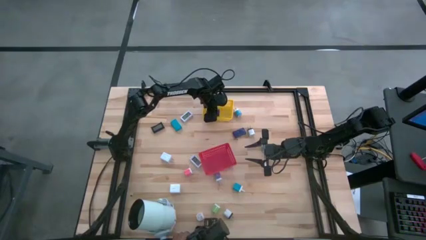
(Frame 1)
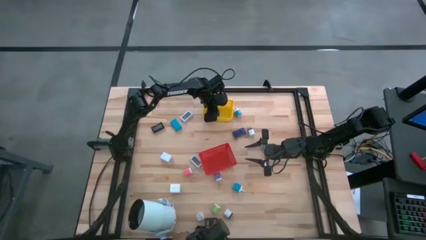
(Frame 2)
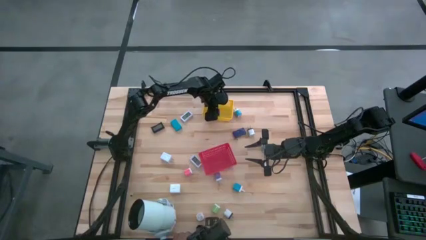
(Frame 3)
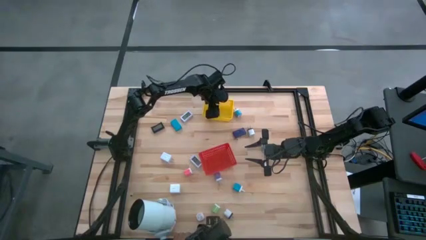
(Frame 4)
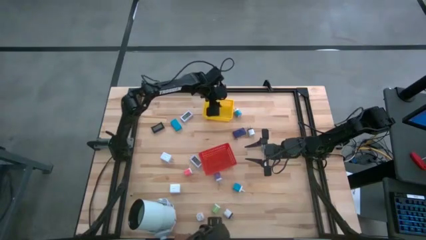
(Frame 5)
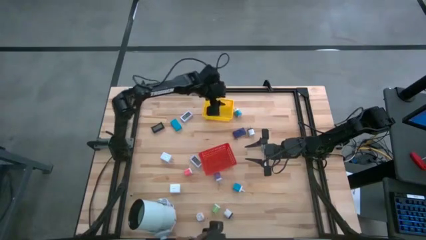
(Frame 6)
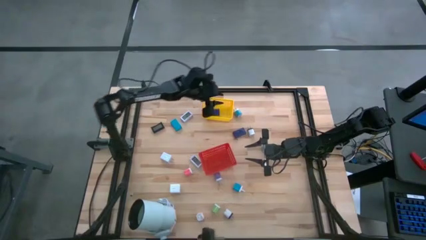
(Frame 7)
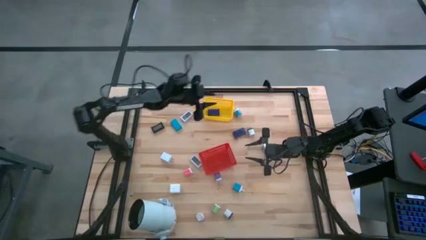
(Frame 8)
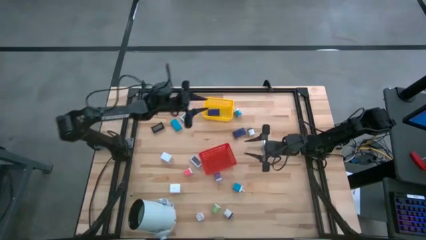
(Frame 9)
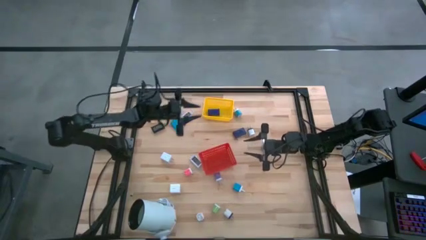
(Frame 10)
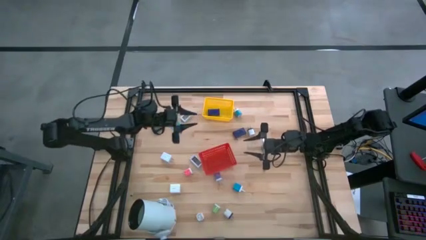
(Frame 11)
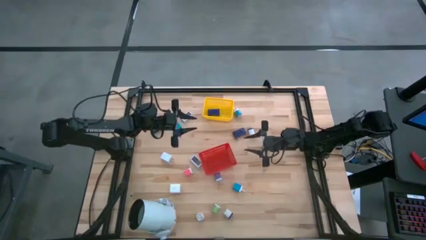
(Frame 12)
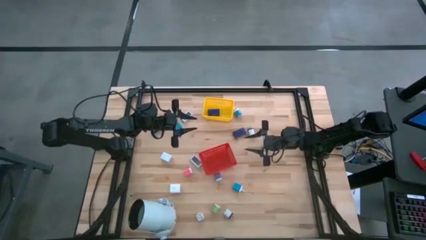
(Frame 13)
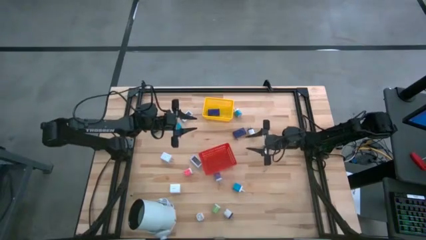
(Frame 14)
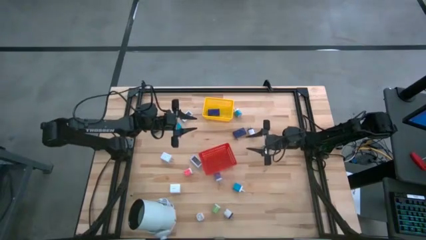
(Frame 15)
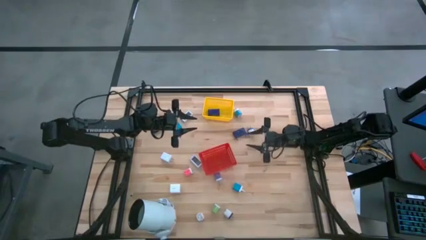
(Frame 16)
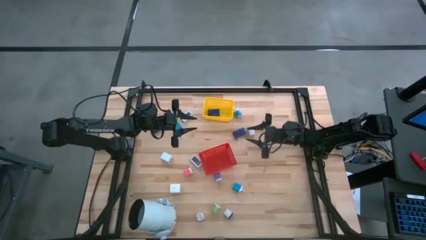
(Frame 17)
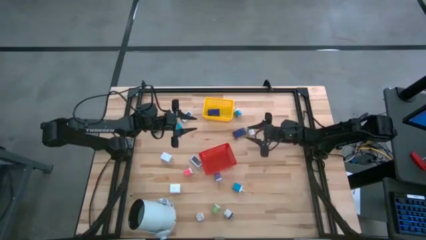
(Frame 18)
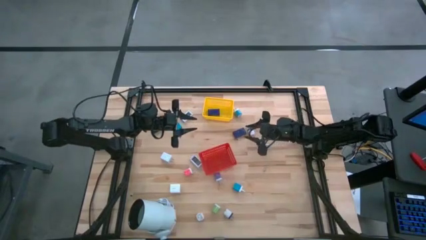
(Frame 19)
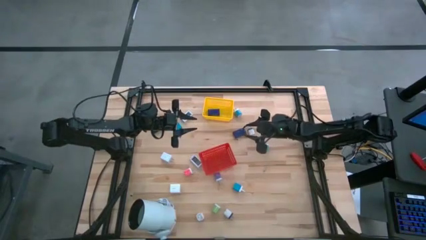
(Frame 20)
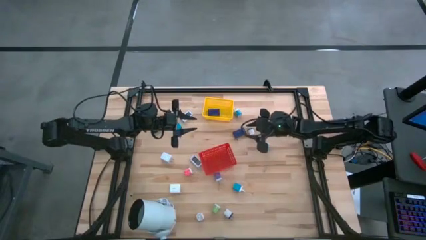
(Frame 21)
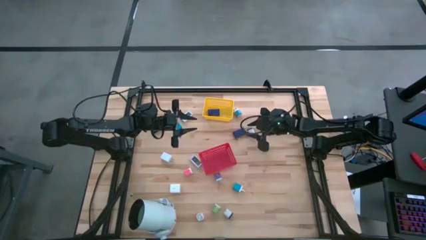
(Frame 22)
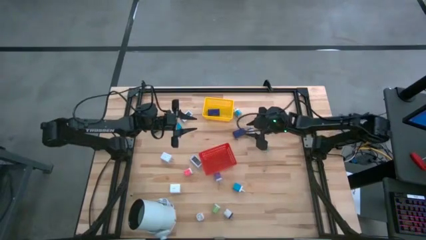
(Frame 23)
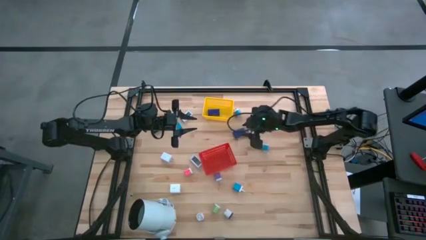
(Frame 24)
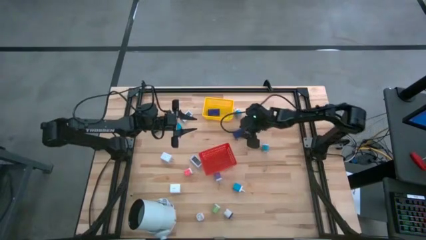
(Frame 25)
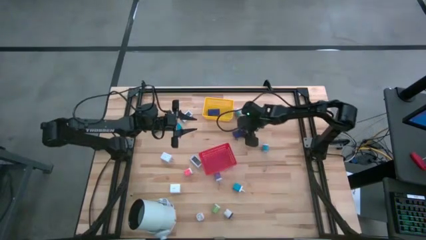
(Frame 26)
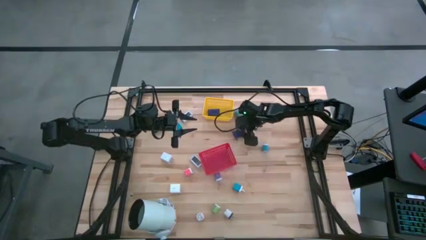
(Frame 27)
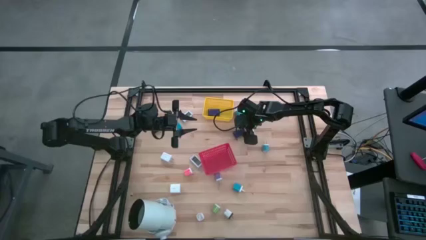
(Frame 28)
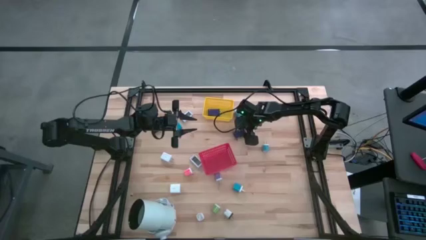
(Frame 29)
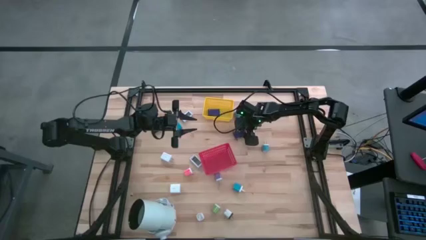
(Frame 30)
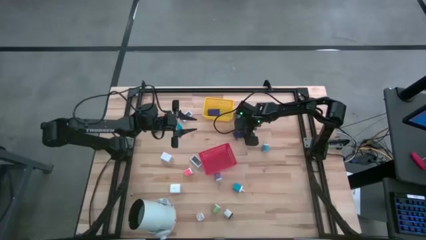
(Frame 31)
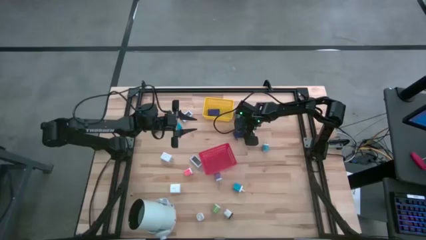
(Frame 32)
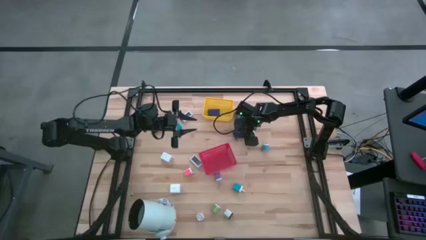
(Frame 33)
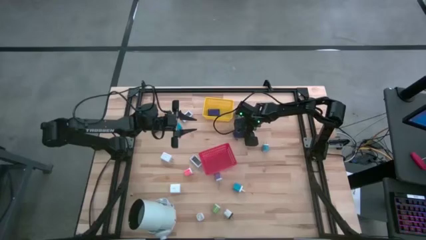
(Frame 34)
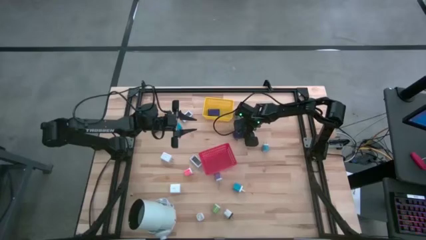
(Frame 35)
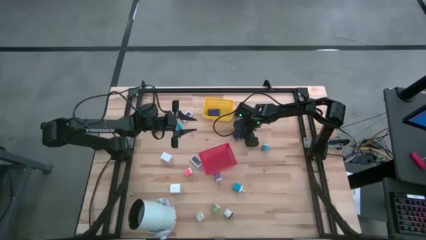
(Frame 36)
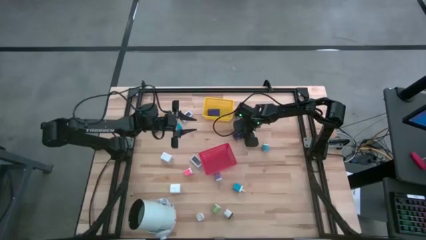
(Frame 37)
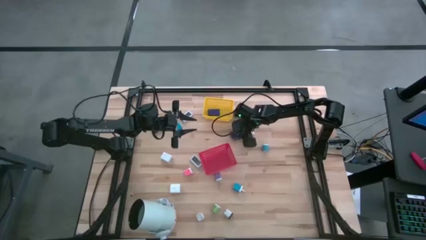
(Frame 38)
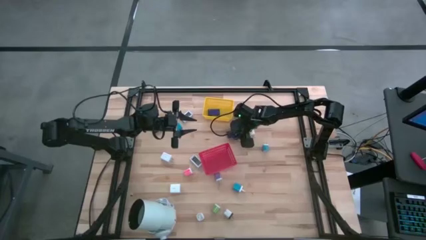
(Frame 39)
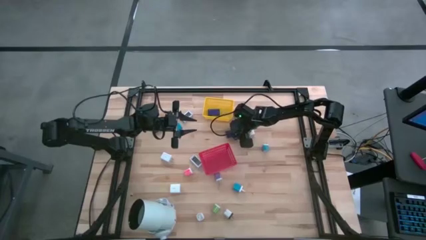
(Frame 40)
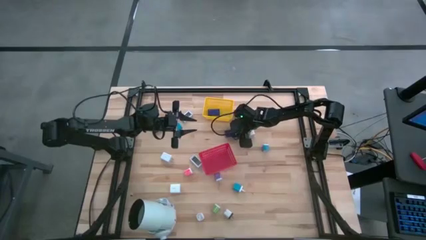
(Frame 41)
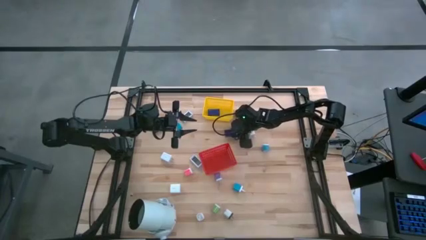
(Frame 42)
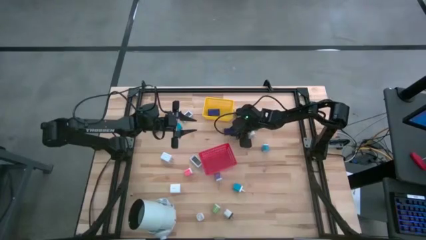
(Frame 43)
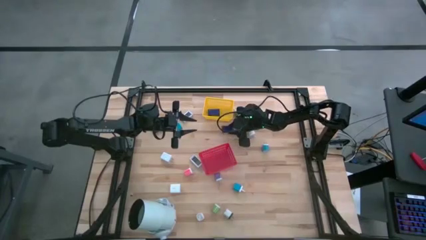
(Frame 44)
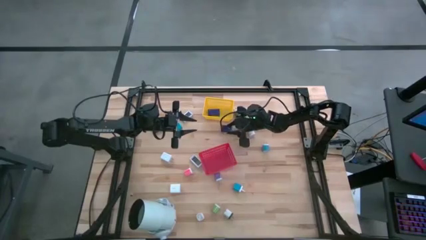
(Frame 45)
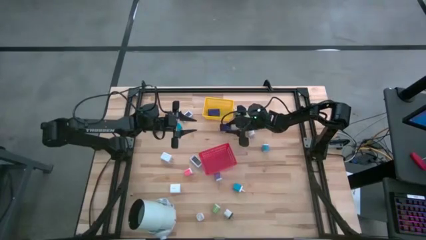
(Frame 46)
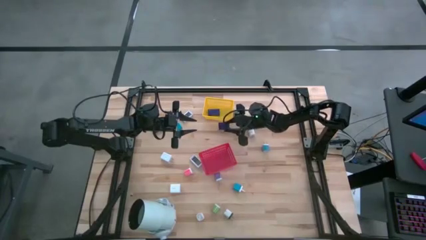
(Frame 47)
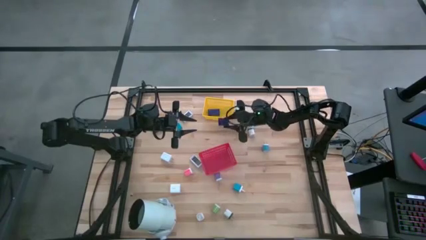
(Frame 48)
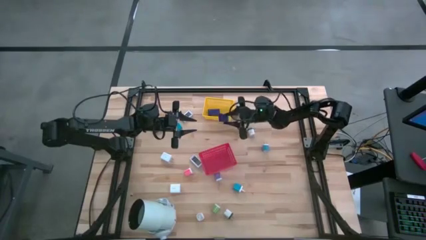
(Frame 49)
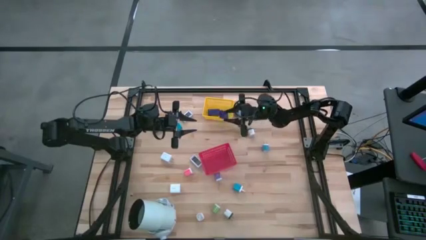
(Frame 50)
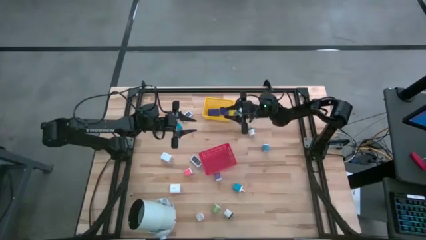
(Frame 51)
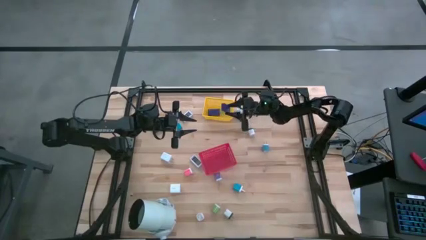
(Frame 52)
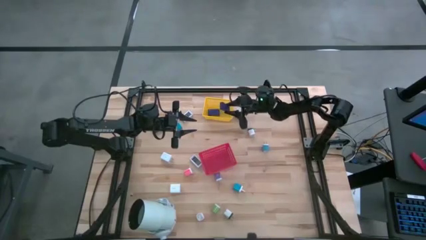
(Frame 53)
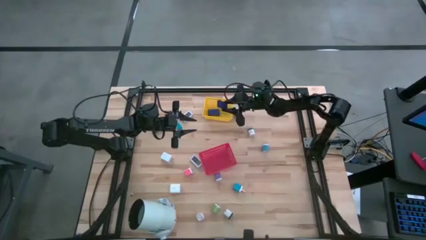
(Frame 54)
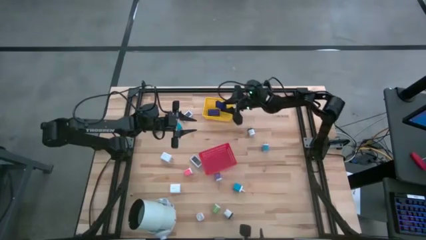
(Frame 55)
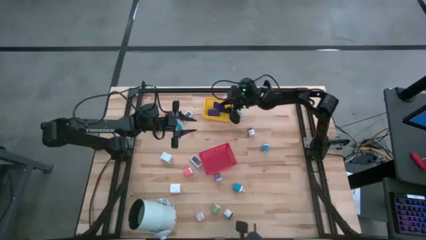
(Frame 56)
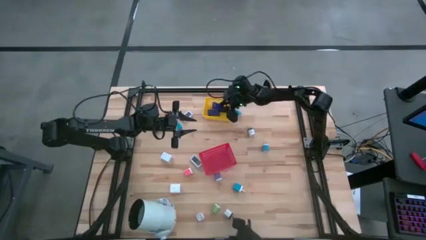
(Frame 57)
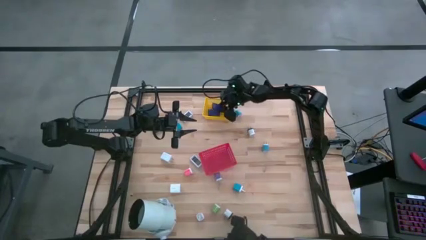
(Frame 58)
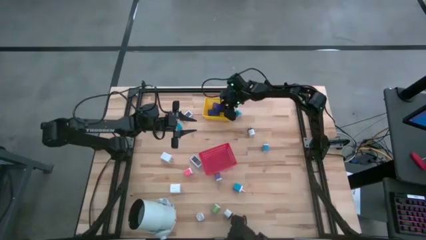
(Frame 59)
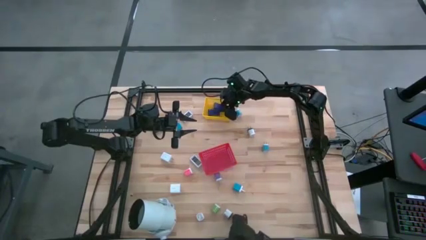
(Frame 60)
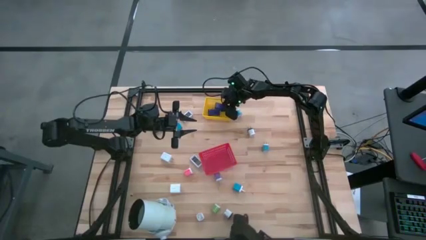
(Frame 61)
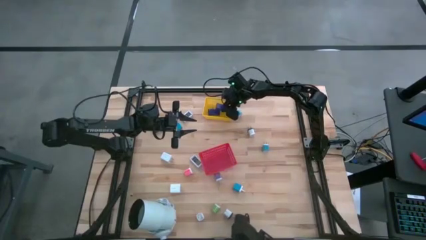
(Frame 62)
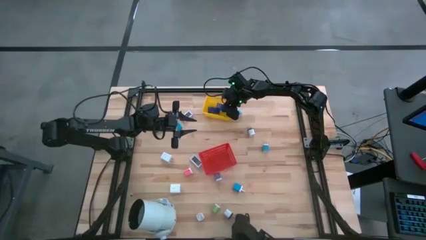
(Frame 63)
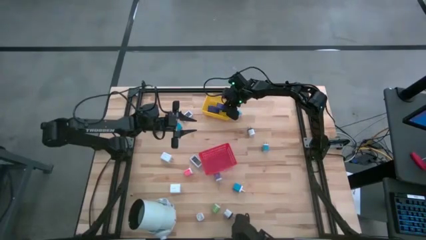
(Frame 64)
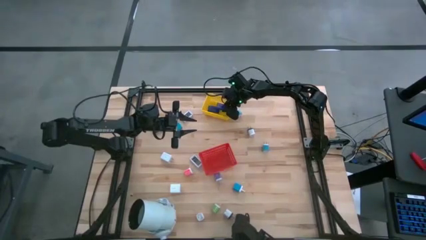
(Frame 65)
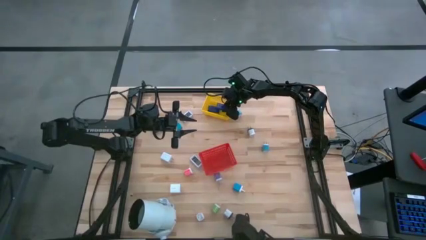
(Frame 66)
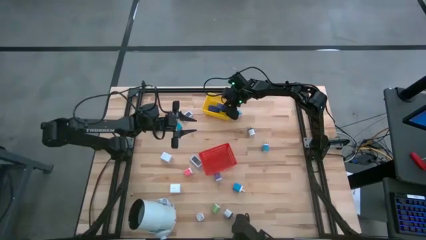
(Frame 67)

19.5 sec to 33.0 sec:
Task: Pick & Place Office items
Put the blue digital clock into the yellow bin

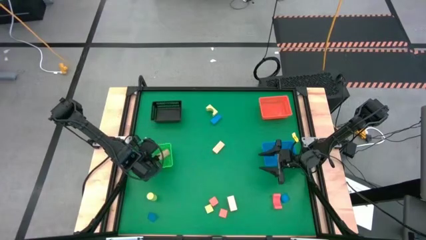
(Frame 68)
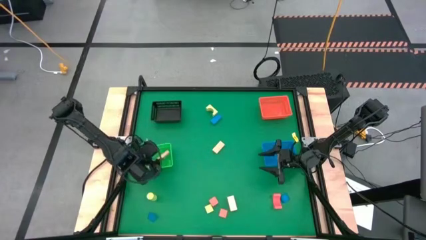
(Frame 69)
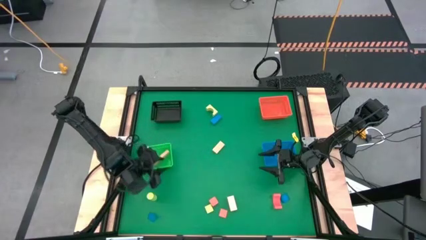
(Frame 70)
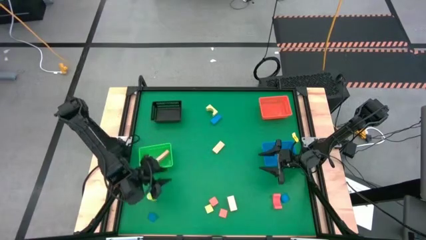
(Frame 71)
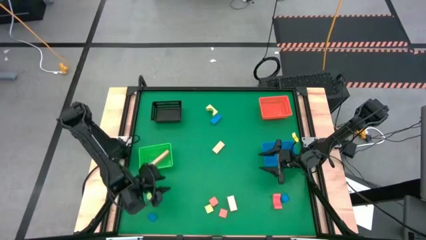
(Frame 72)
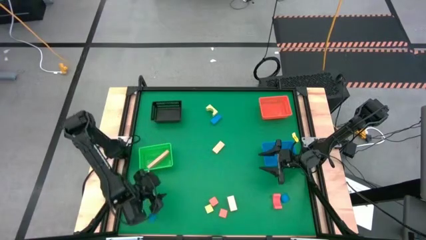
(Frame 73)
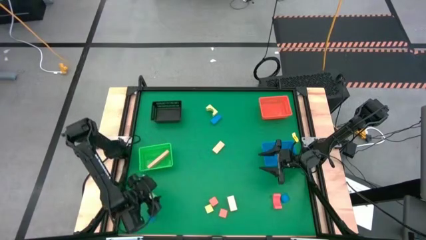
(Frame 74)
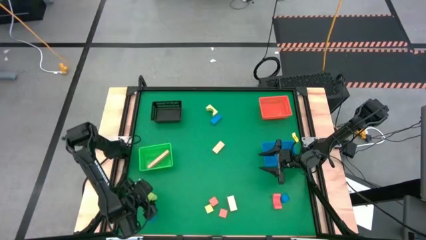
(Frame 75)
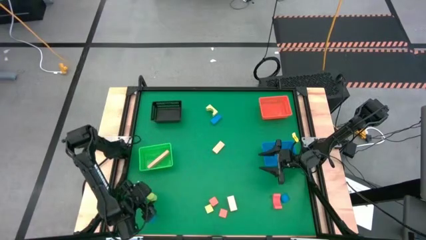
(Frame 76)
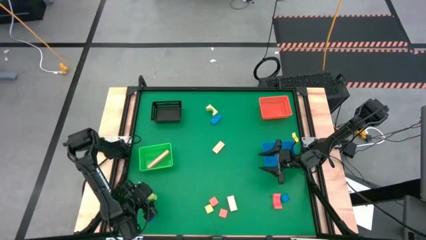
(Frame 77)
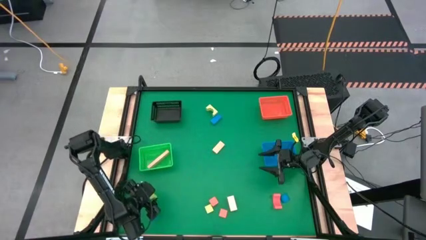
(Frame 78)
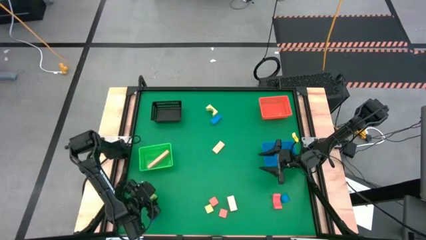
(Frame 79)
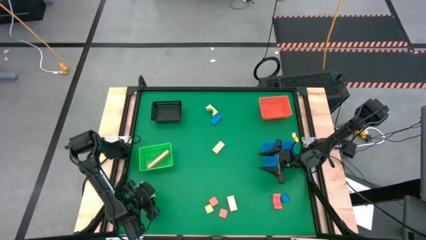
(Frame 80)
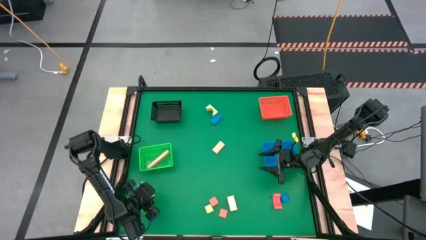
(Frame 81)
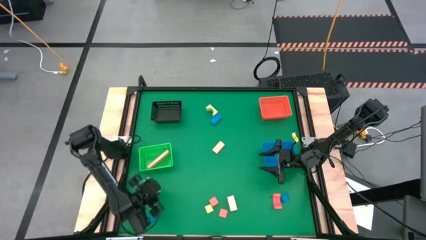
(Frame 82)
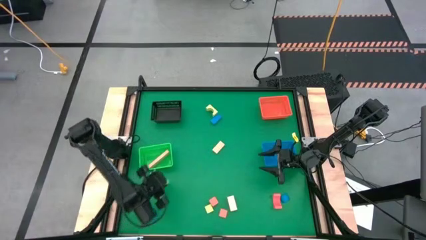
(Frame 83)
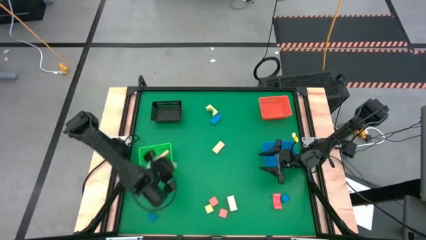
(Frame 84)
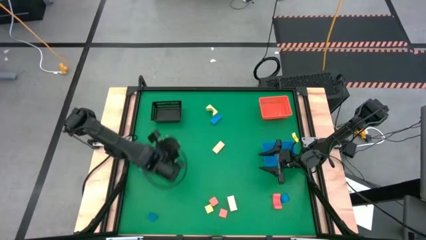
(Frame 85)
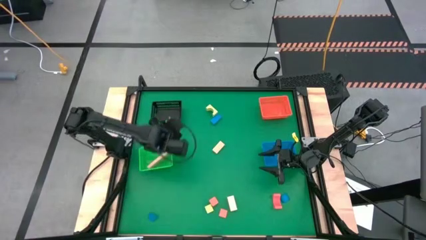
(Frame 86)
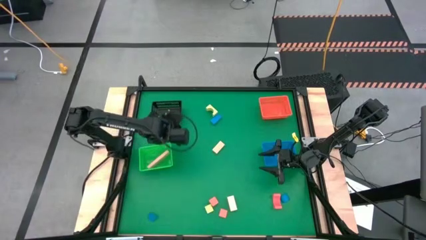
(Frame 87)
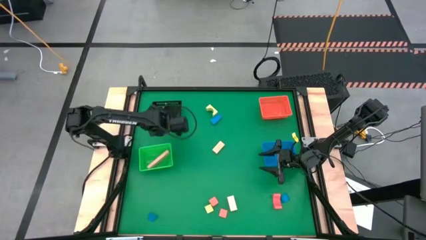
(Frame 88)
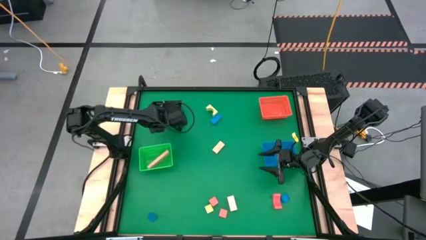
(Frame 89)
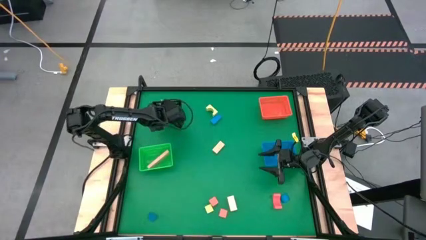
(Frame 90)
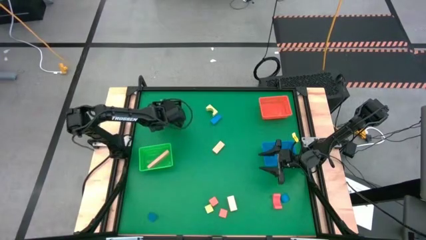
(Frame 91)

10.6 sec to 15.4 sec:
Task: Sort & place blocks by color
Put the yellow green block into the black bin
